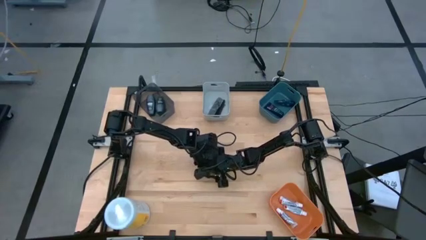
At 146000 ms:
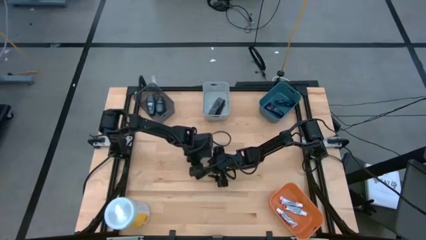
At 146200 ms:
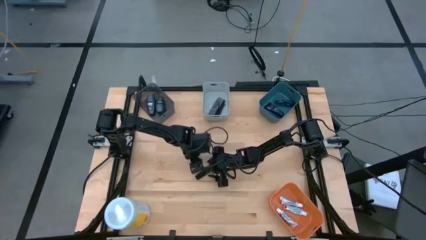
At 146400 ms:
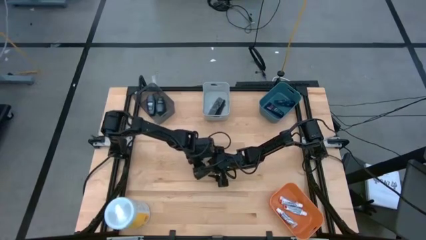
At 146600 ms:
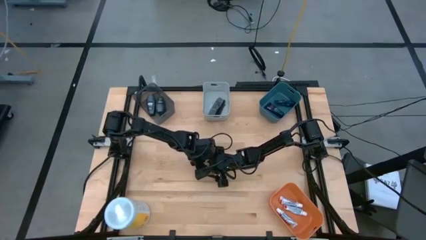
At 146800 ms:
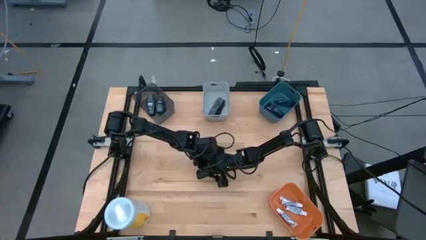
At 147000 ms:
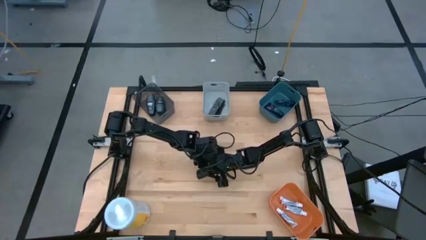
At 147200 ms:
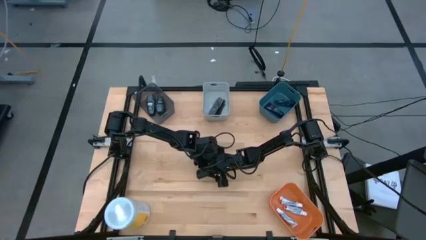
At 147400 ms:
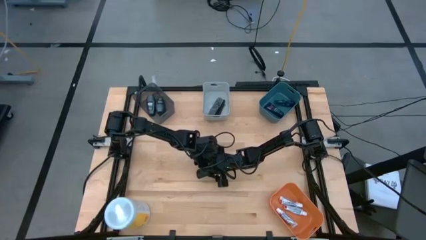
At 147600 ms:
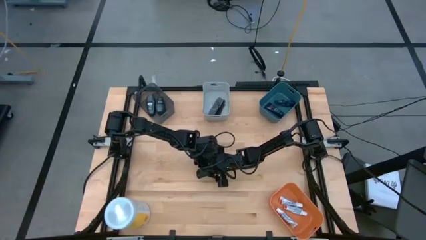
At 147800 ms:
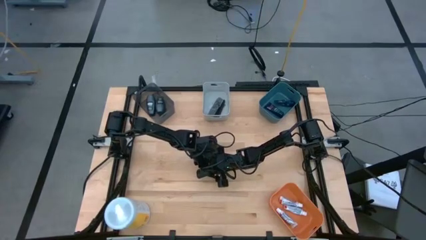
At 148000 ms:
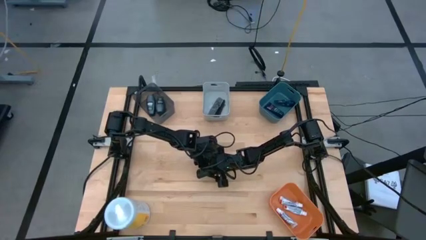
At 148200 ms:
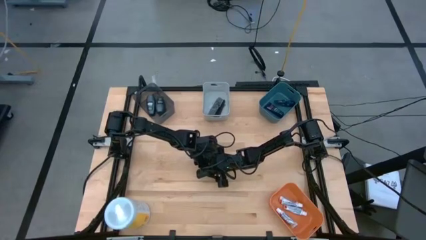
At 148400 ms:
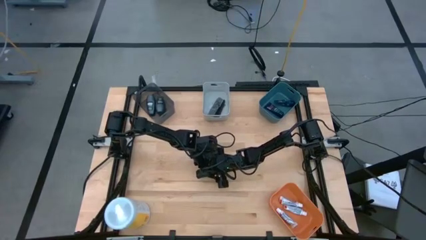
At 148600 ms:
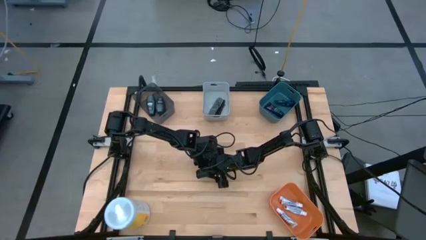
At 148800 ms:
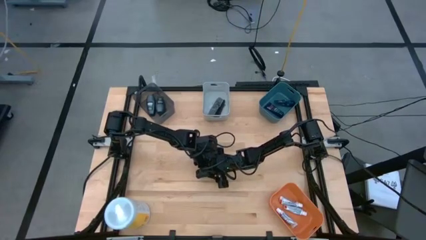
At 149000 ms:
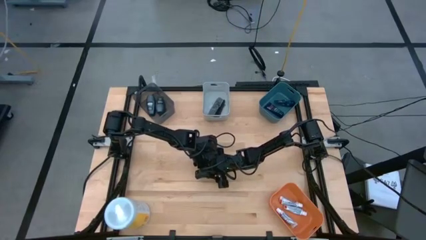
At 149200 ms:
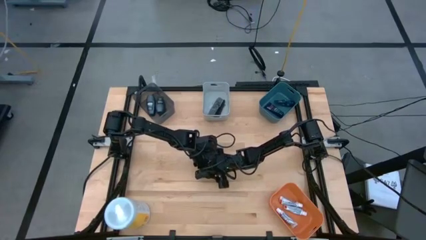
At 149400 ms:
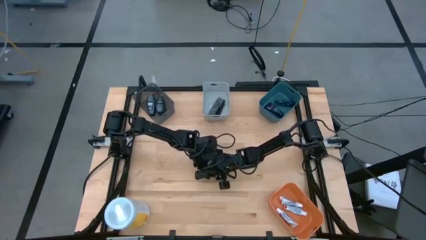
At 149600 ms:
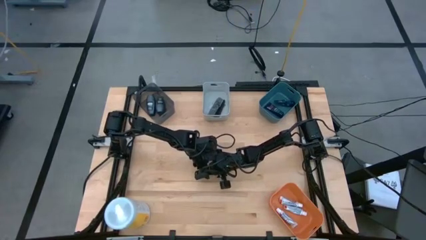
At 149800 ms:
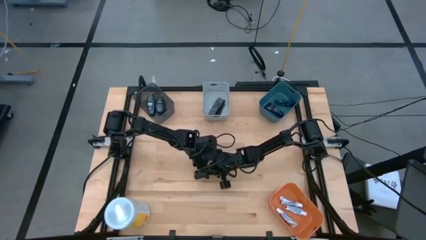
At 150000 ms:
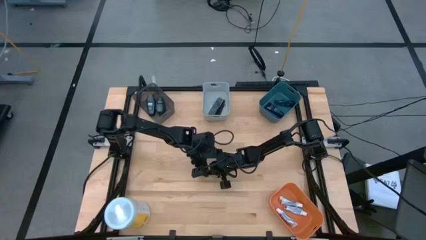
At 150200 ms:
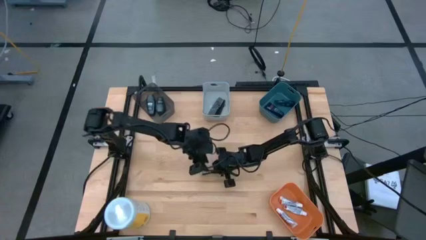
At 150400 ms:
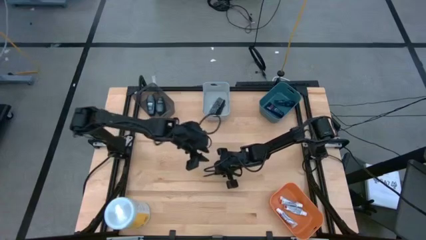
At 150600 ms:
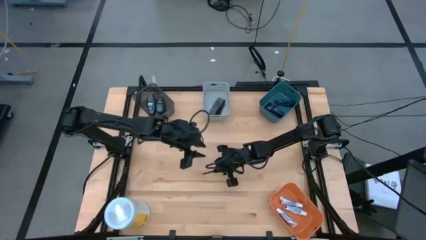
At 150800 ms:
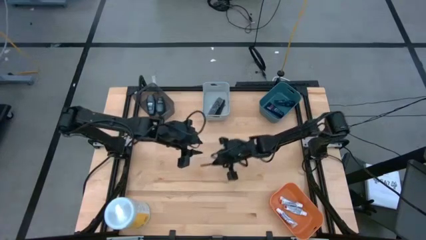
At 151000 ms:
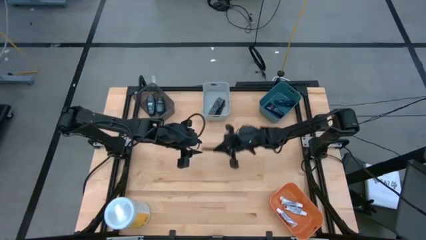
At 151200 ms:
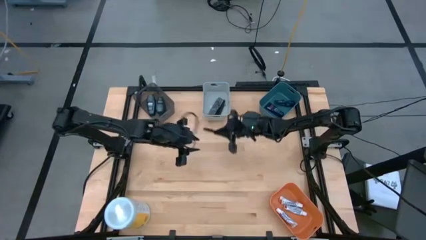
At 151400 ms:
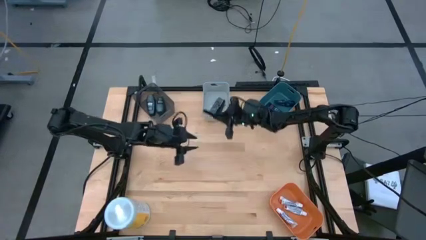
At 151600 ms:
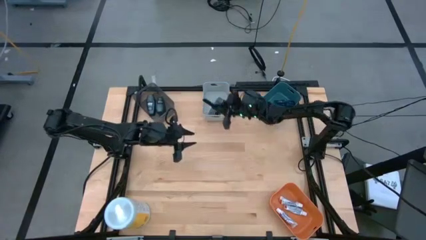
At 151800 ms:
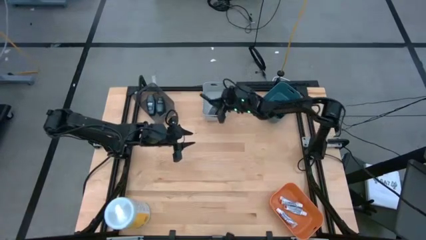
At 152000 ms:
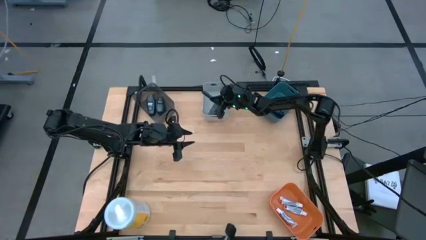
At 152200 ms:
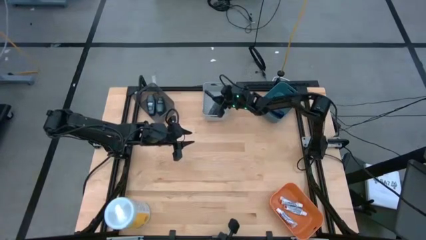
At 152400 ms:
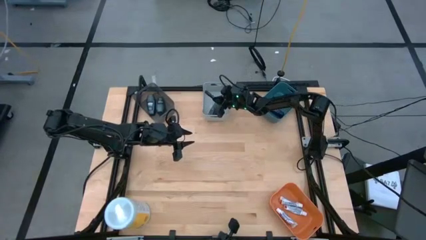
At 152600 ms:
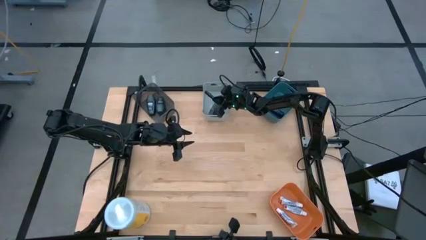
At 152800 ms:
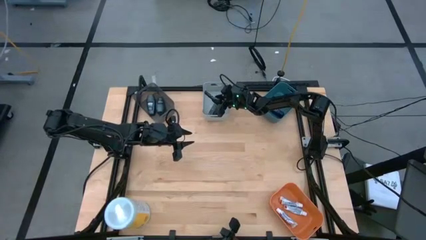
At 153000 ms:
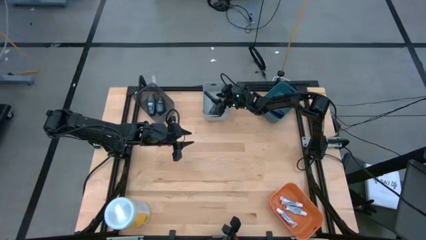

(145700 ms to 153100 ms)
Task: Pick & Place Travel size toiletries
Put the black comb into the gray bin

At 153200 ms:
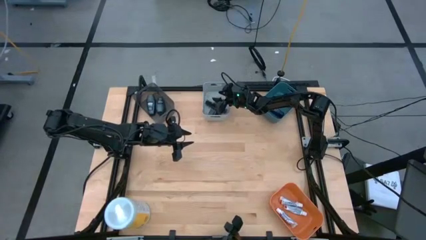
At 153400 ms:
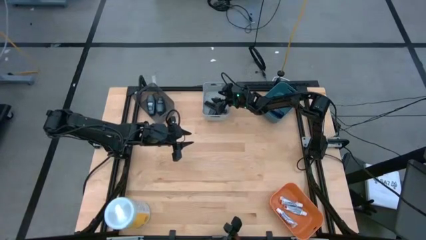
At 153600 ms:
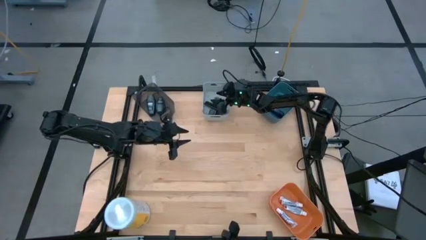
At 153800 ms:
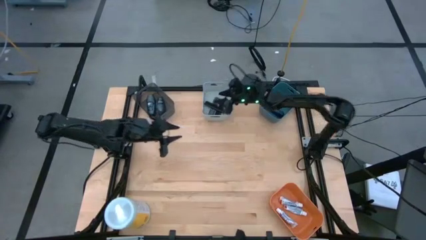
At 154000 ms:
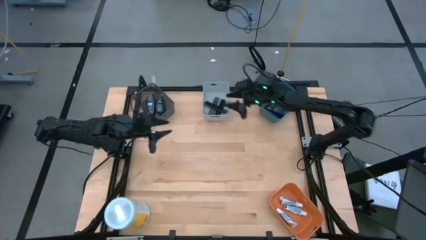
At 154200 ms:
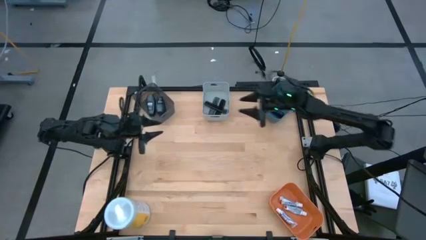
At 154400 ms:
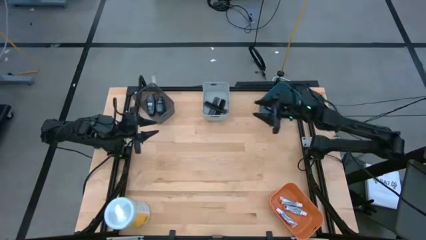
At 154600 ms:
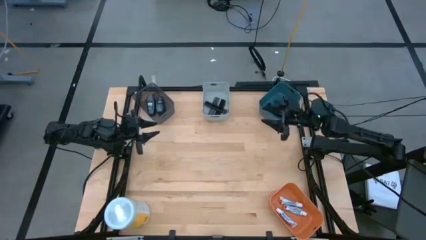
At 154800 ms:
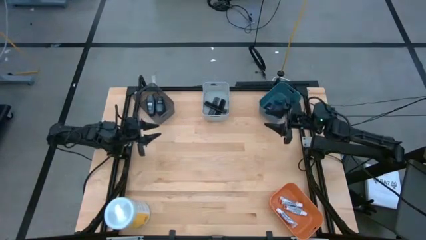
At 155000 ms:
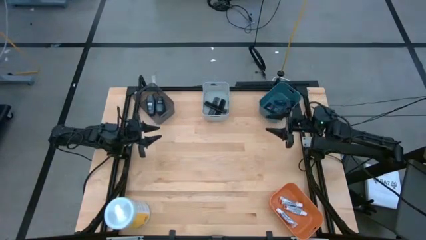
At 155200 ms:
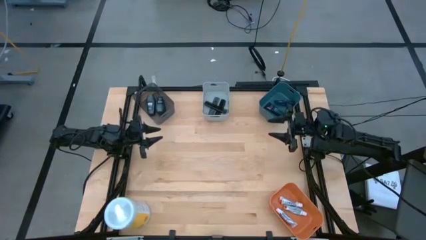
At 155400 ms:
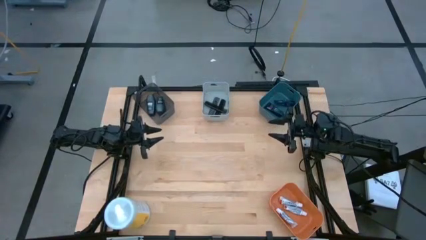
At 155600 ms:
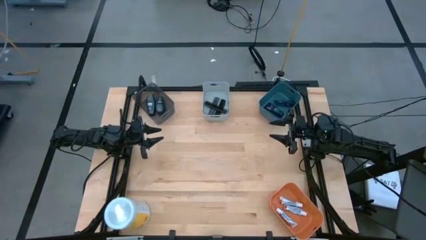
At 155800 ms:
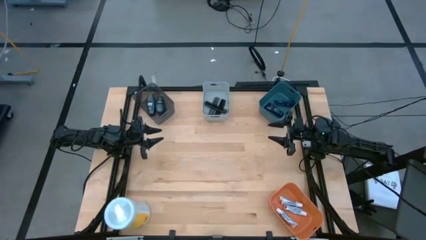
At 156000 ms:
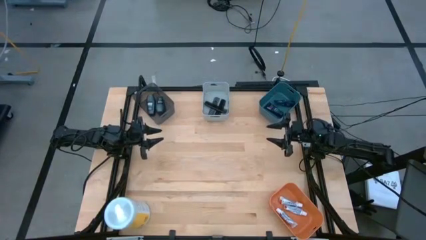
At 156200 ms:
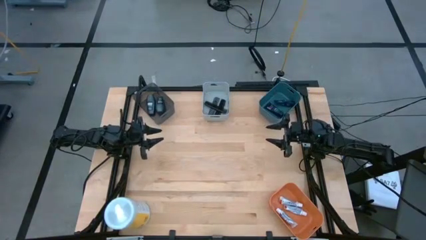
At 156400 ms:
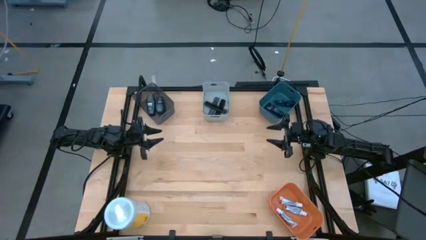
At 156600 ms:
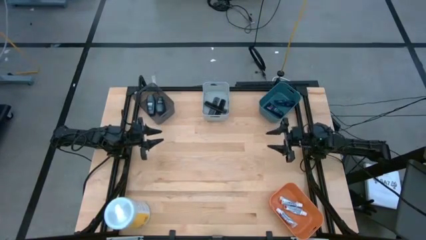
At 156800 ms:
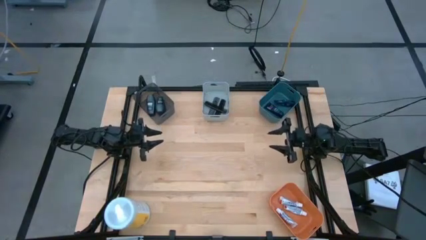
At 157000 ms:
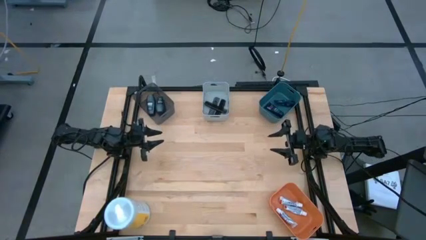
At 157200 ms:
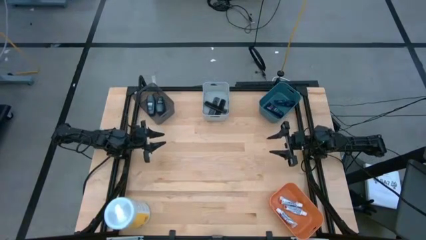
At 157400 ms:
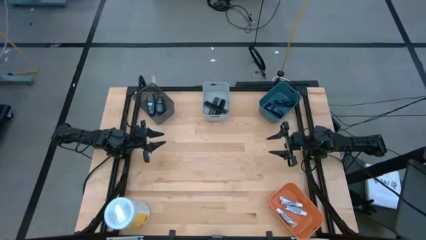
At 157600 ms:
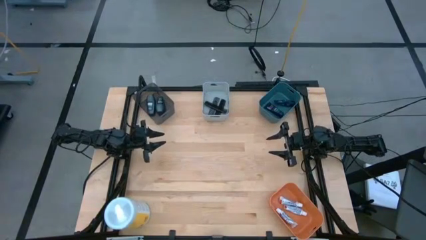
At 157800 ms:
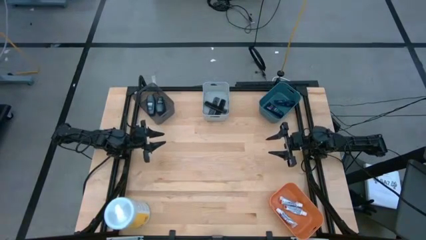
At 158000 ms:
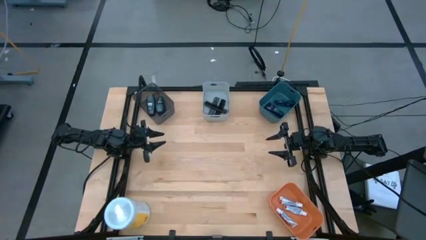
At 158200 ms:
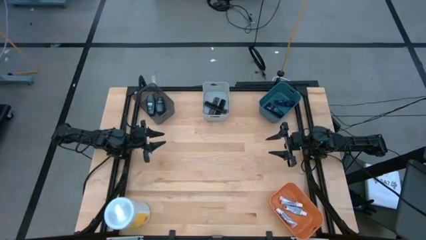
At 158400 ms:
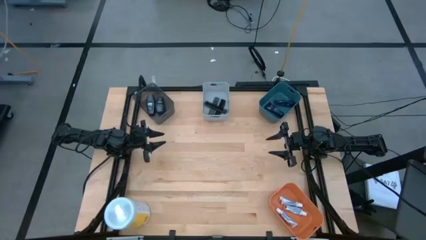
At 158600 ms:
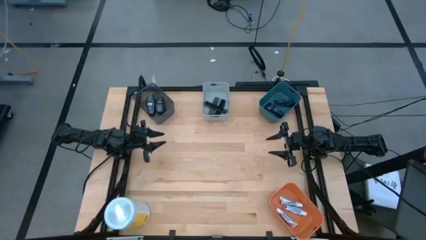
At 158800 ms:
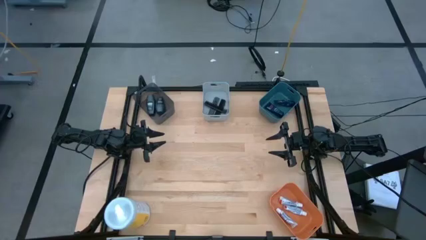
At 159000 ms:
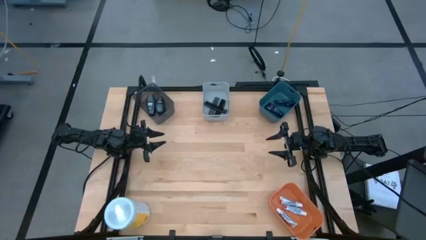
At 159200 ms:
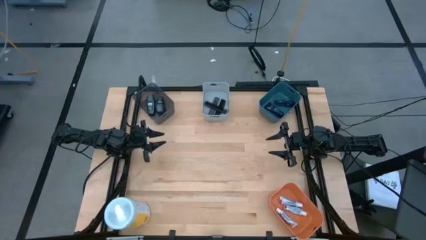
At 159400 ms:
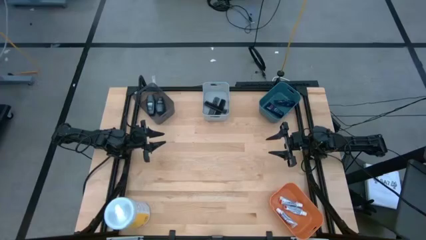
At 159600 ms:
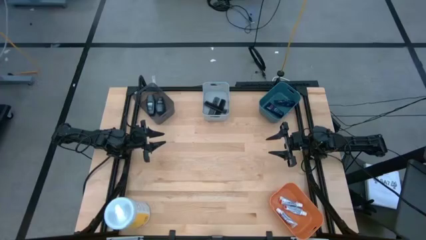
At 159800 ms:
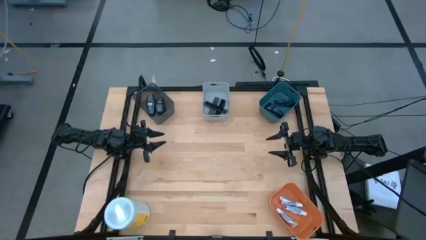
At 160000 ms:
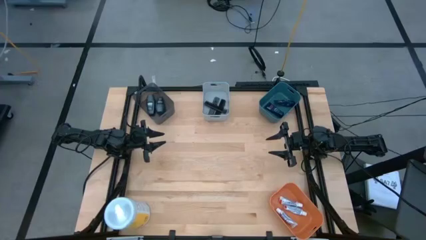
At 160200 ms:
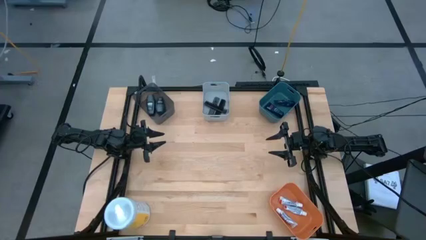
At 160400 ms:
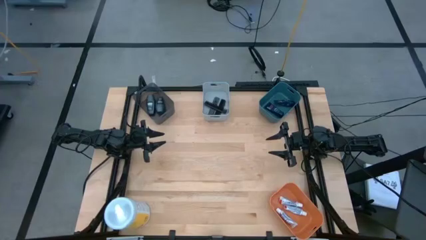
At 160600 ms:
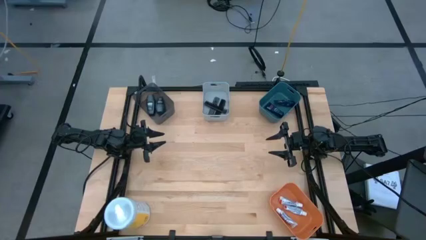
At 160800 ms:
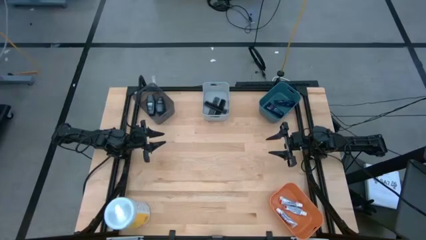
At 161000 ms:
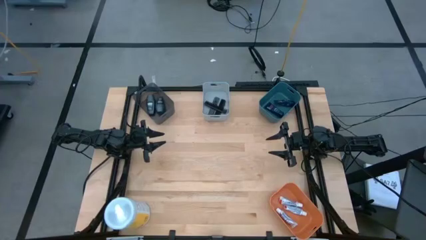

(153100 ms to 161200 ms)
Return to Home Position
